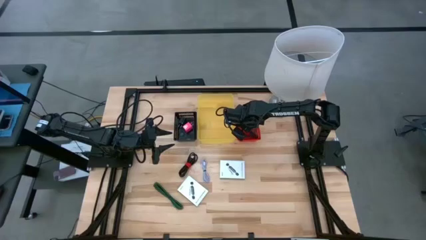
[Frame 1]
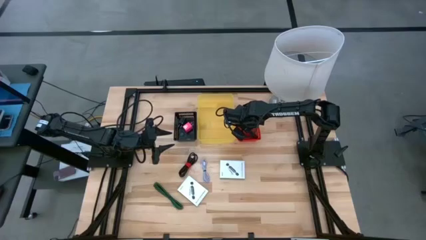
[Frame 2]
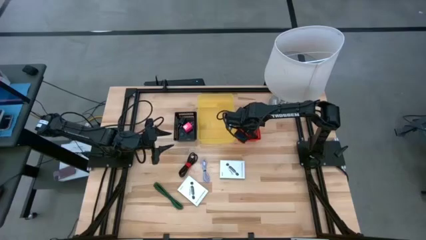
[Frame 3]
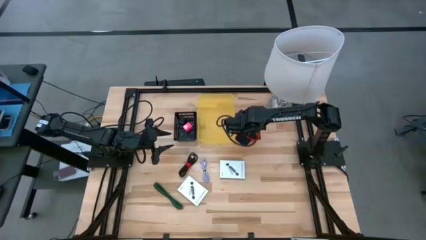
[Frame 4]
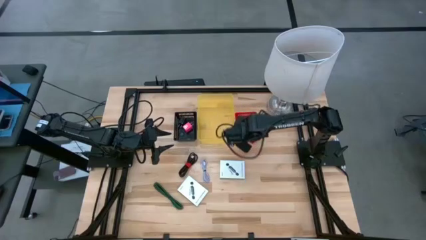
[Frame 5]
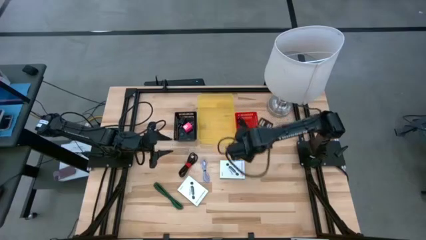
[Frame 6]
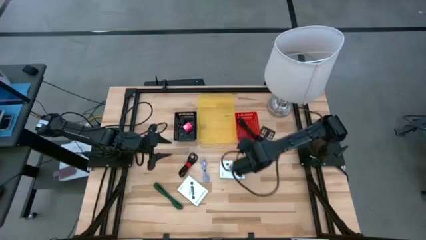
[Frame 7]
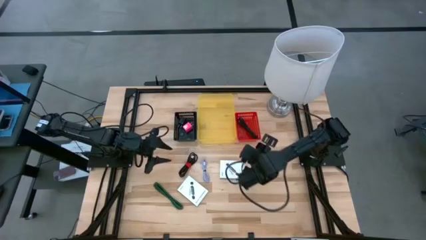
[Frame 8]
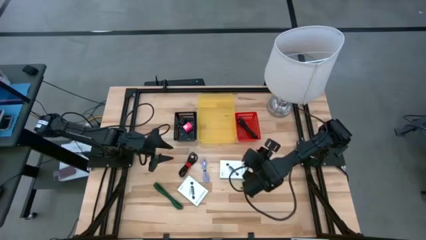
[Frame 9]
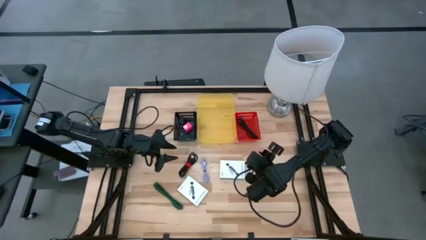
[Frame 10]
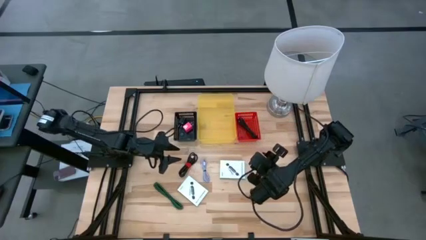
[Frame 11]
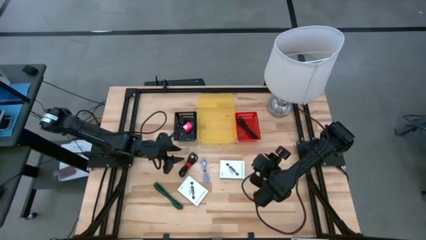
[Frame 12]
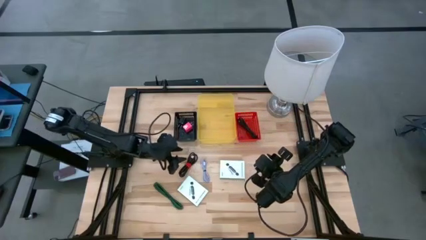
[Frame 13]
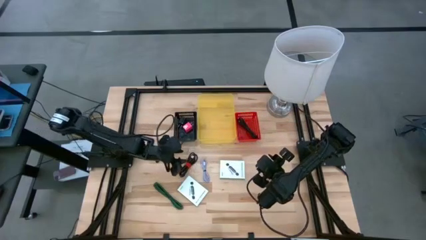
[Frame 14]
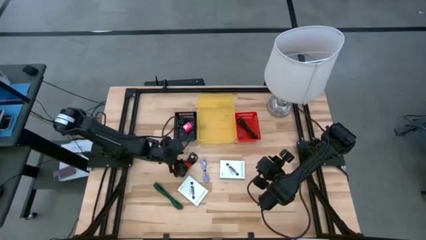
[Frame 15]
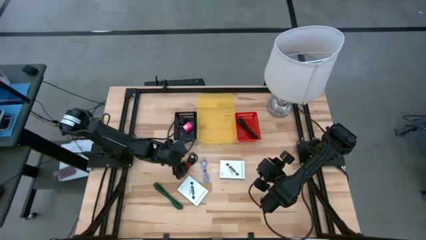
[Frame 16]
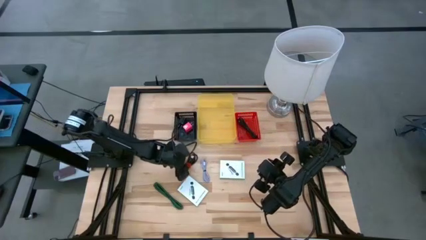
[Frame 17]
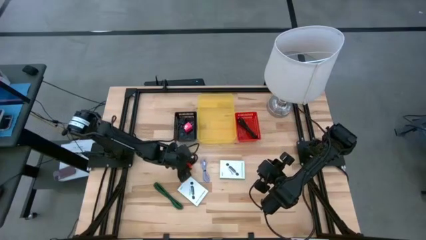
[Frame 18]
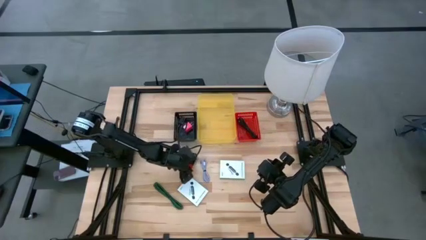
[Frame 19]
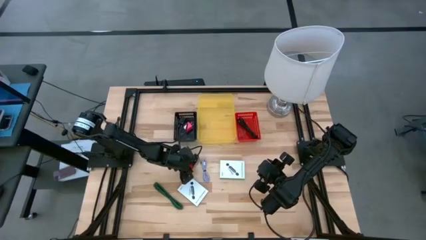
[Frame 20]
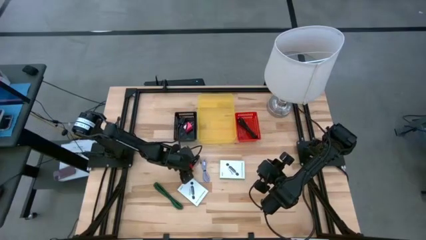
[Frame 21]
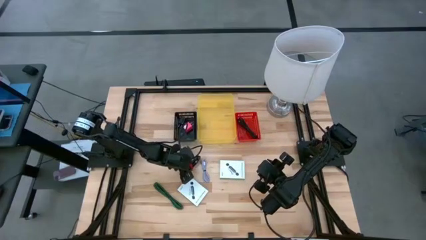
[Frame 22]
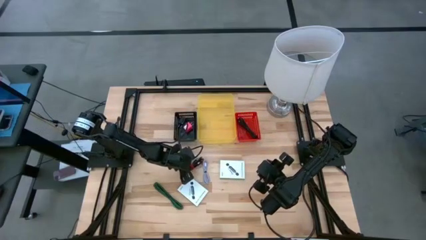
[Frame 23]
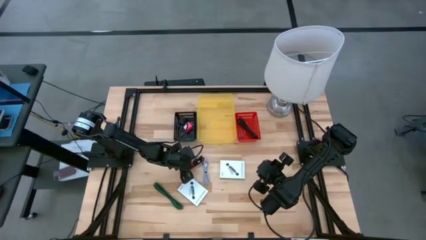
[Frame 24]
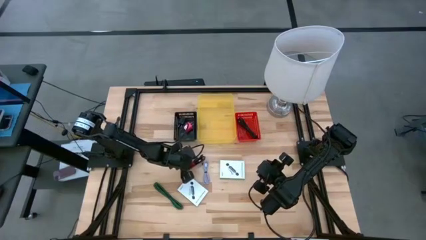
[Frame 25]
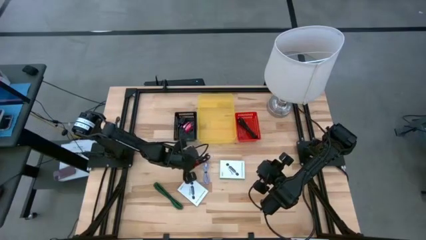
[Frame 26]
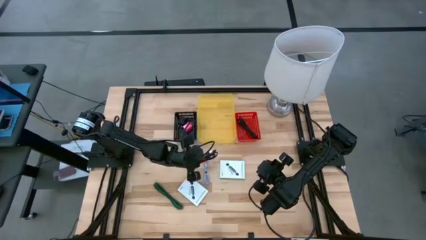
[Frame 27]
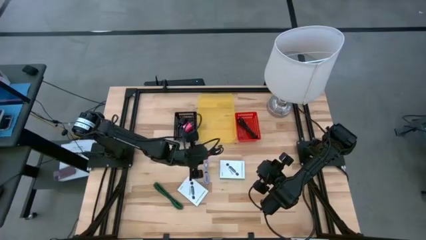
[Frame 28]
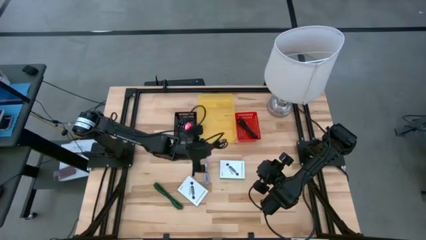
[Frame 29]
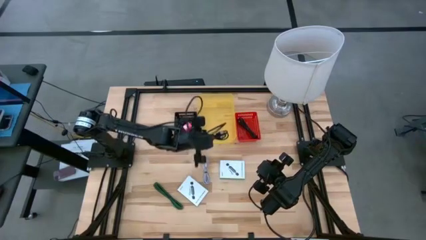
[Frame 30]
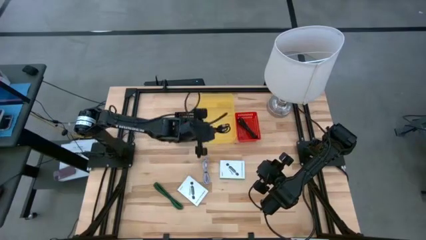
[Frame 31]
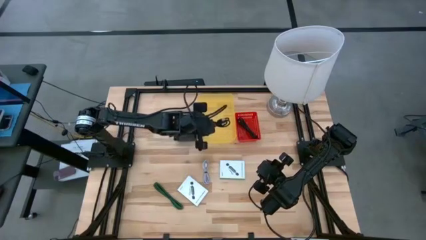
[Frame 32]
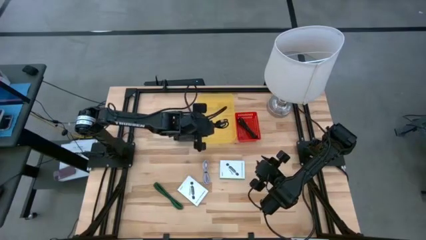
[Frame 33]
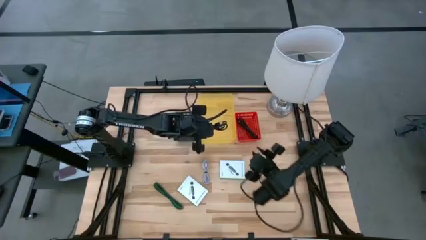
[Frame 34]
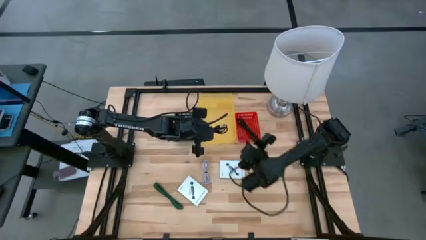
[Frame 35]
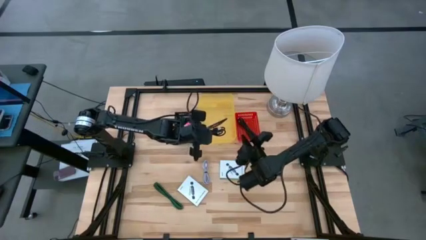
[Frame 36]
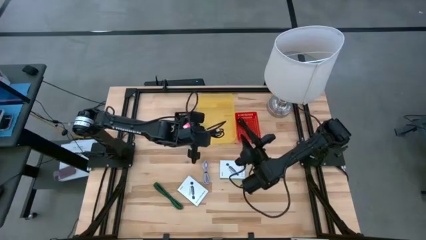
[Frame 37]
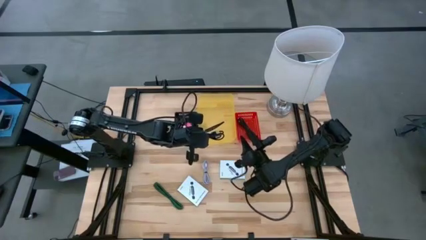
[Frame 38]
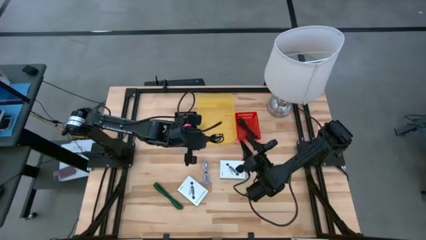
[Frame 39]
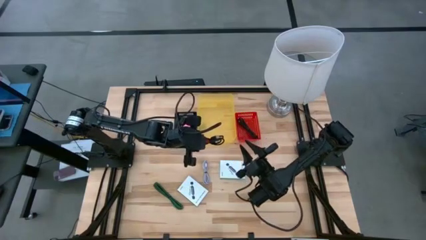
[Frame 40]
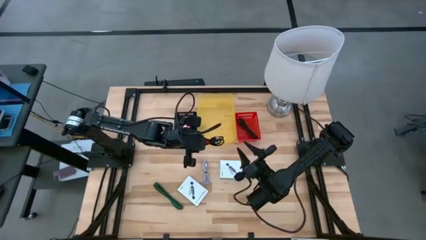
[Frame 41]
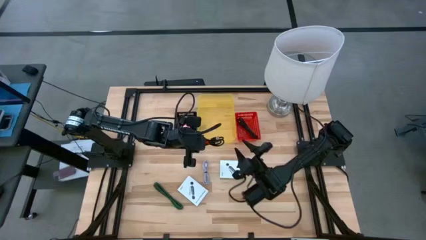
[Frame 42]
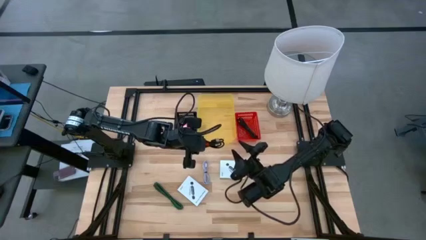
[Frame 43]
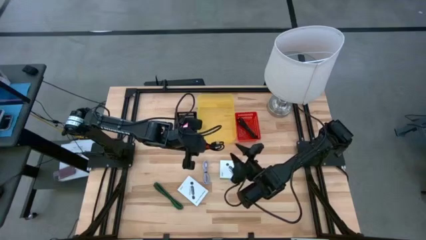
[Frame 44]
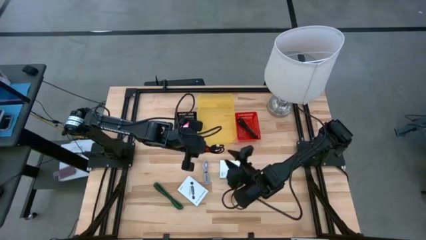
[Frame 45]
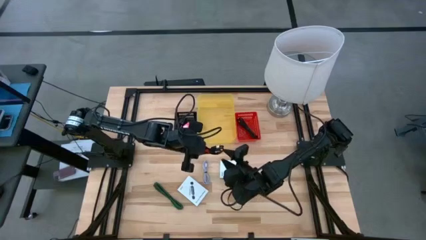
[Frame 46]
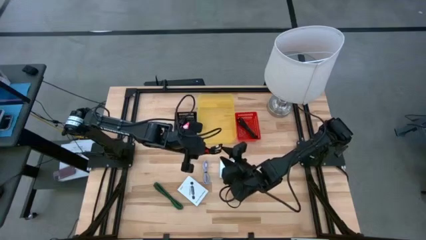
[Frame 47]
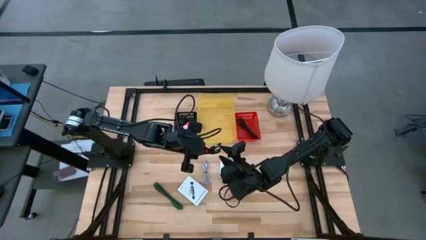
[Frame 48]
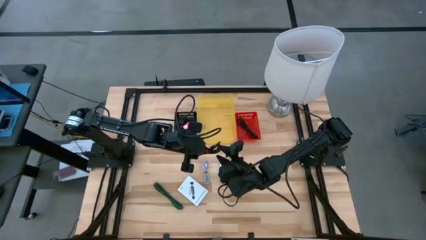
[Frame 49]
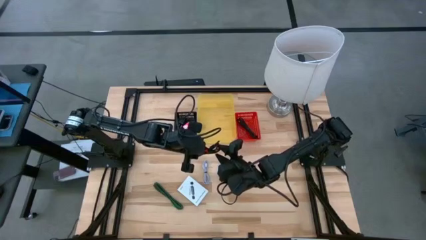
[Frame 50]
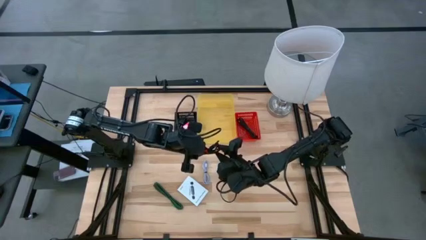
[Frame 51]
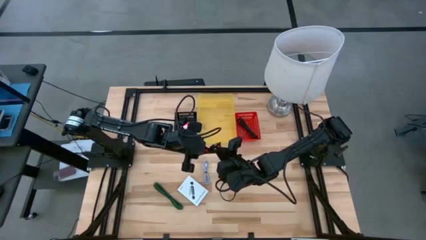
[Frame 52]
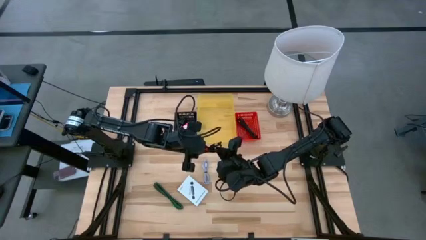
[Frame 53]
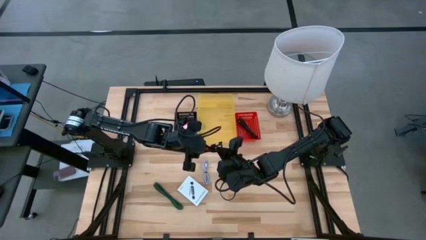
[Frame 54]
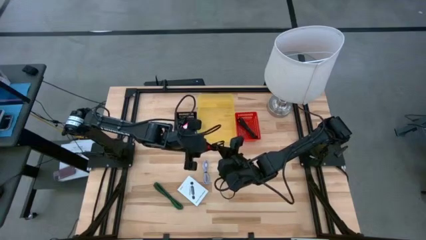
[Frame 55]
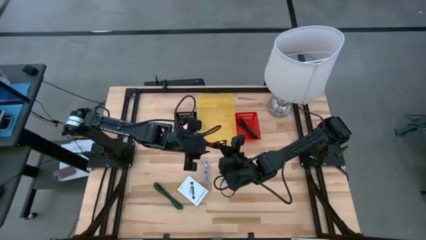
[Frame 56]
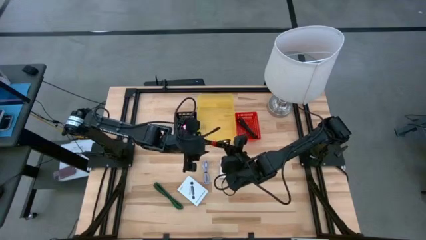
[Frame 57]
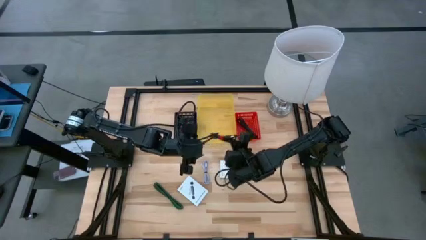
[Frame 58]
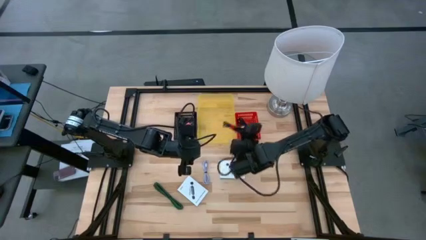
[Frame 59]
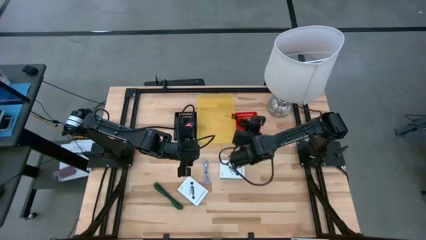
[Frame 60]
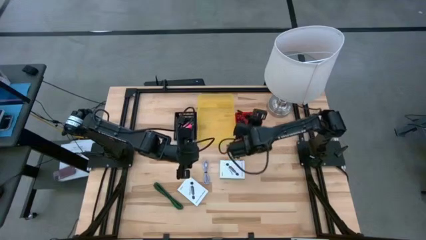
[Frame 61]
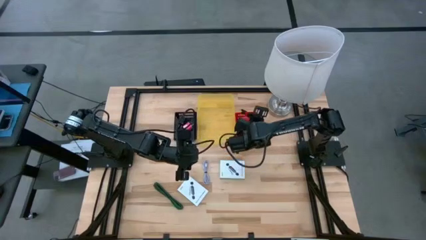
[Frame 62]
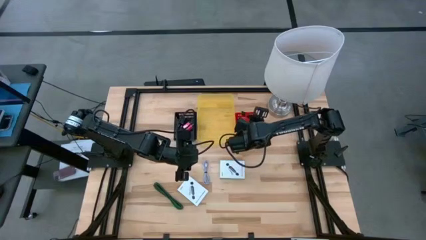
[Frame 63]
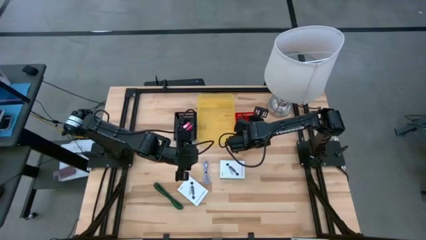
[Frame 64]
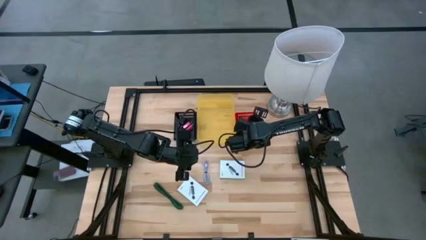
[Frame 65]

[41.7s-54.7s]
Task: Pick and place items into bin
Put the black charger cable into the red bin

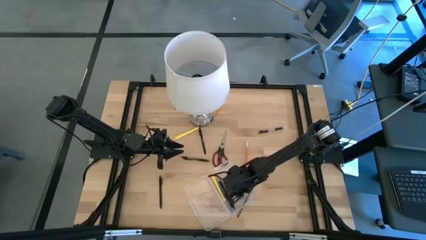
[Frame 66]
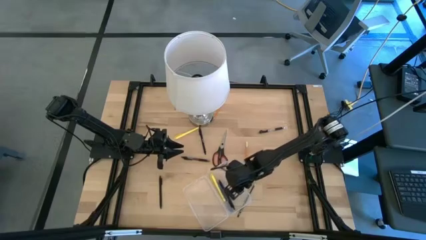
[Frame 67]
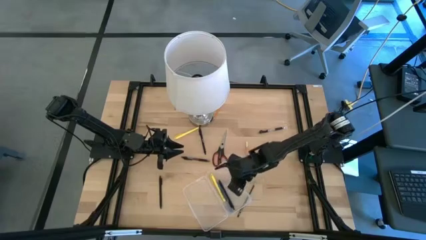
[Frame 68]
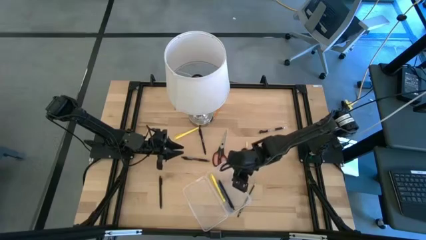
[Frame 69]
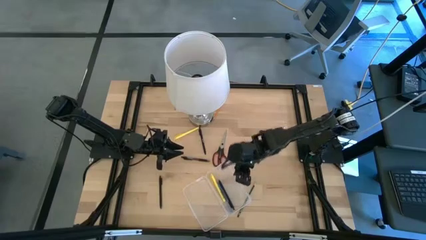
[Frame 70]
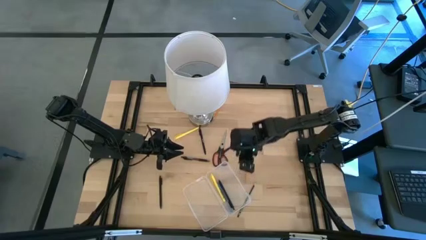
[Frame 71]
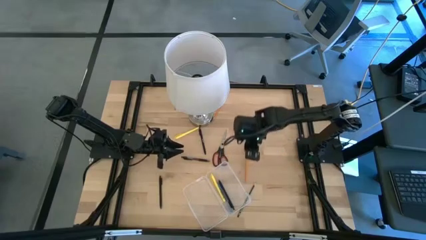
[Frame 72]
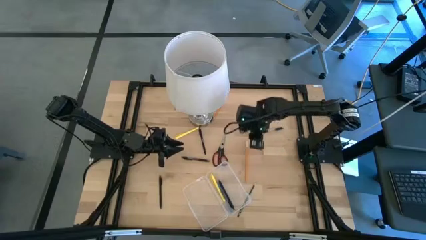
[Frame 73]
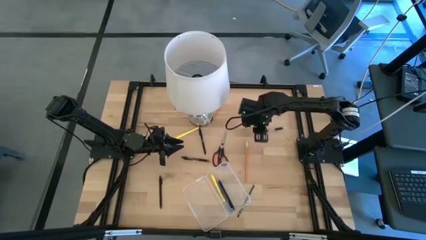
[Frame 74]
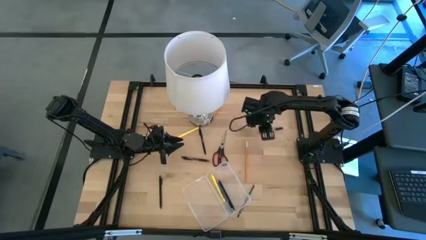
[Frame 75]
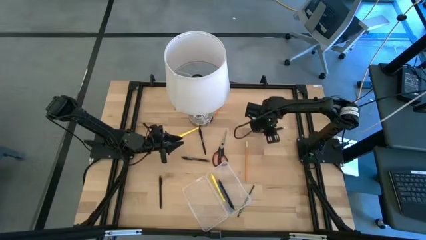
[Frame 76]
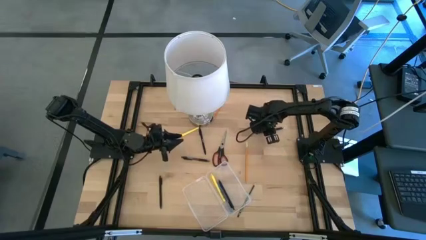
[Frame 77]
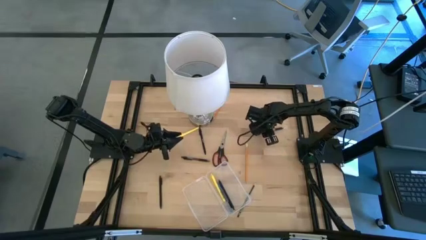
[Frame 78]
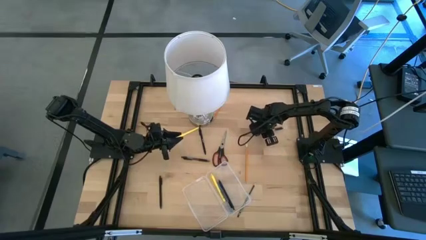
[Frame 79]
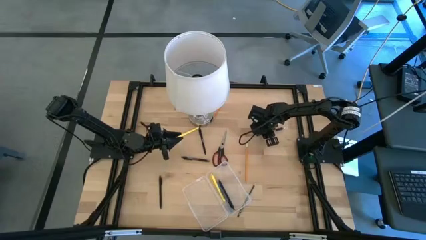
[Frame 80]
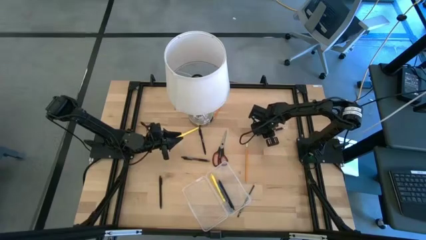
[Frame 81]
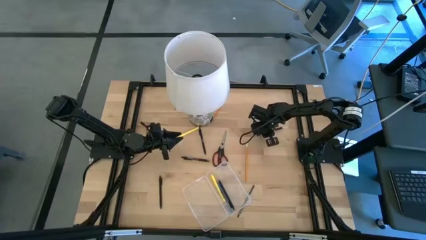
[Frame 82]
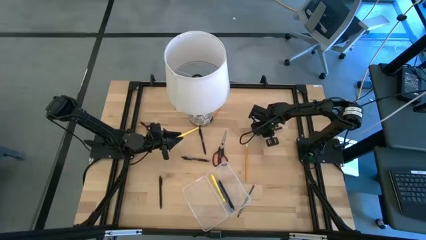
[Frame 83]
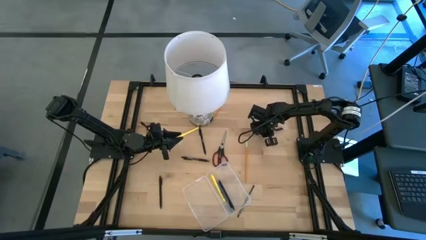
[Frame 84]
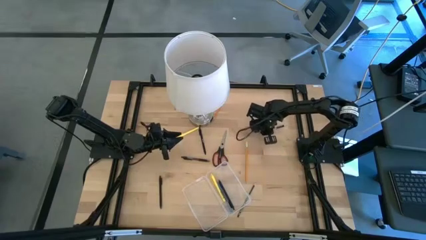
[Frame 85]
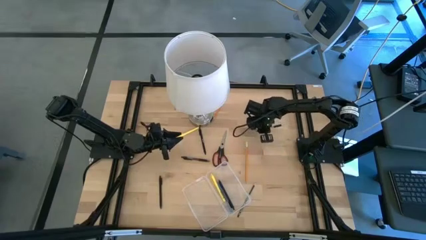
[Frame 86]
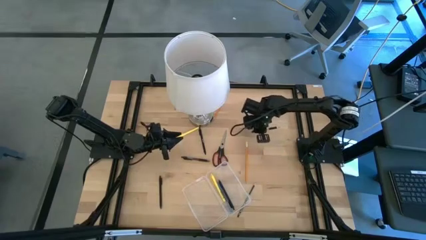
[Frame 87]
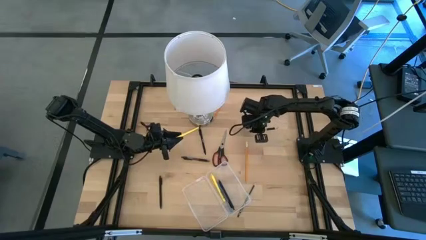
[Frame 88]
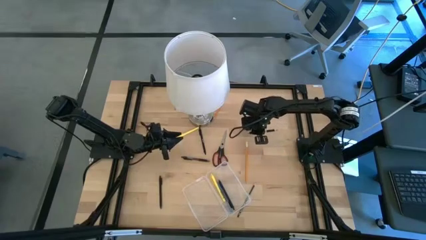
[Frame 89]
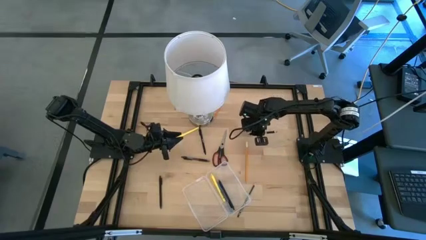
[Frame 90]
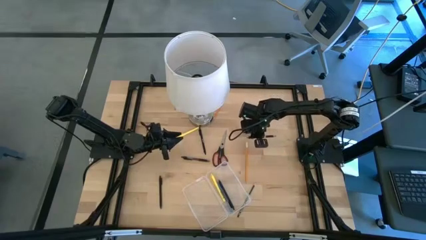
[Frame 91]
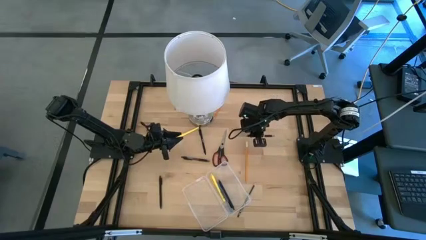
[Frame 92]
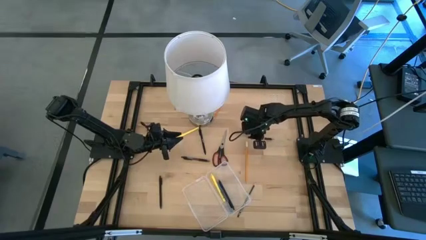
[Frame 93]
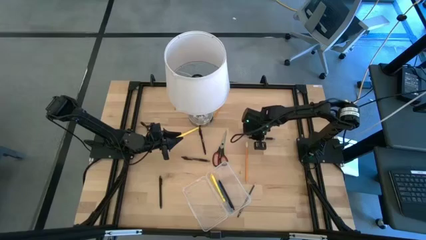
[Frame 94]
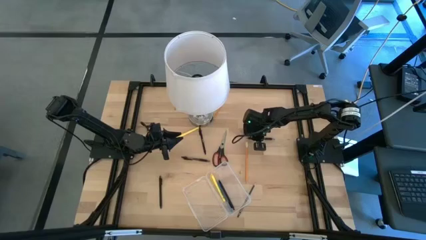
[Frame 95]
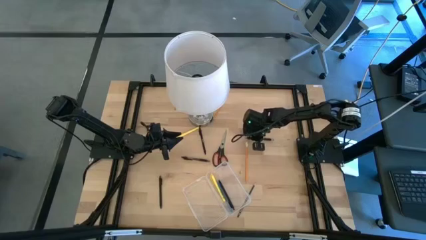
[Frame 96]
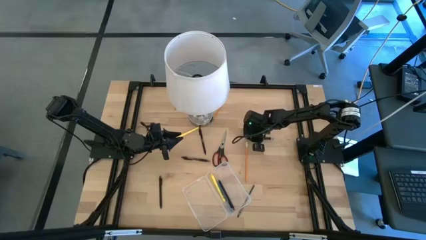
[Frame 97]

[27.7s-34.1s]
Task: Pick & place school supplies into a supply box
Put the top black white pen into the transparent supply box
